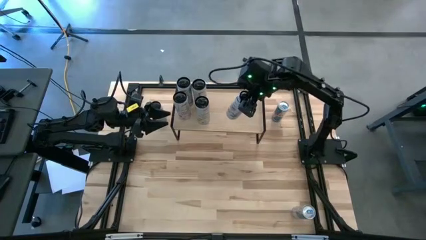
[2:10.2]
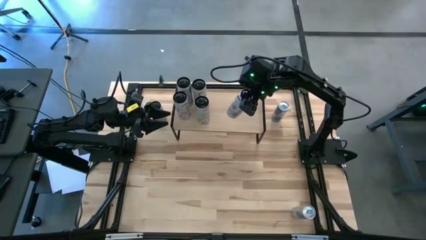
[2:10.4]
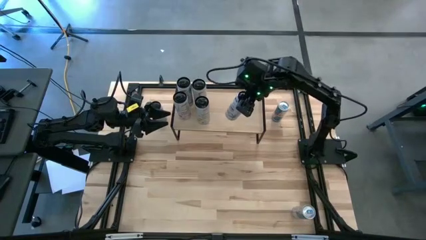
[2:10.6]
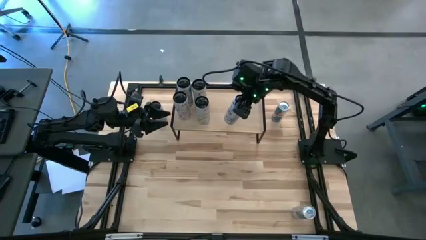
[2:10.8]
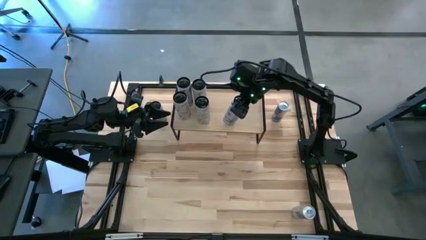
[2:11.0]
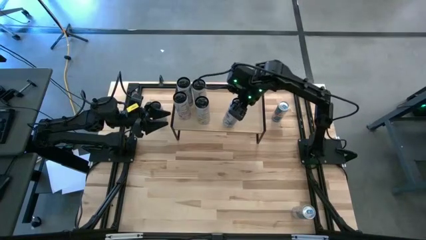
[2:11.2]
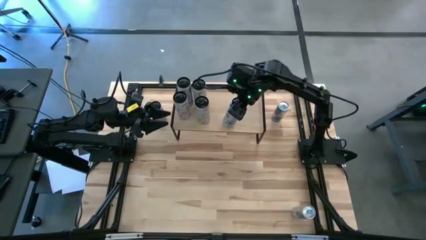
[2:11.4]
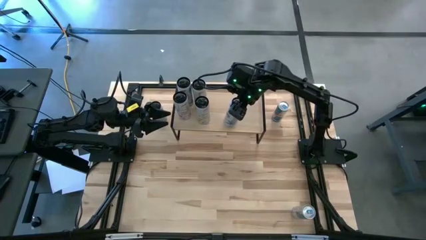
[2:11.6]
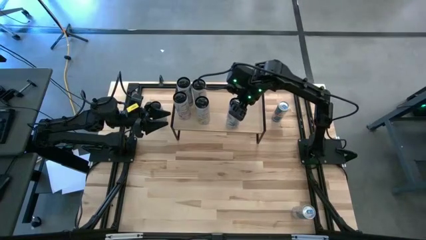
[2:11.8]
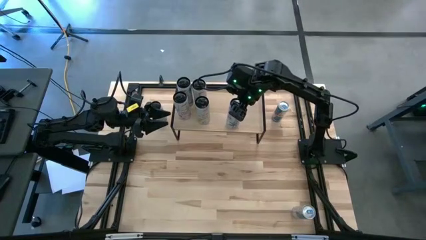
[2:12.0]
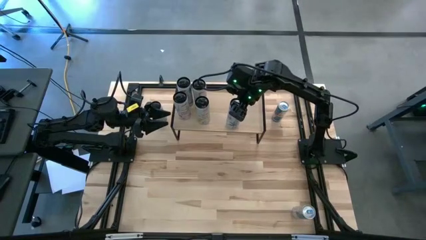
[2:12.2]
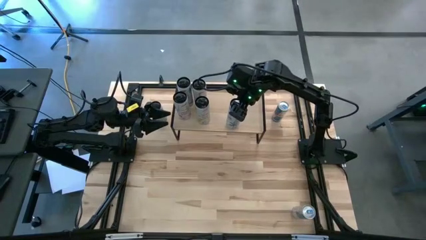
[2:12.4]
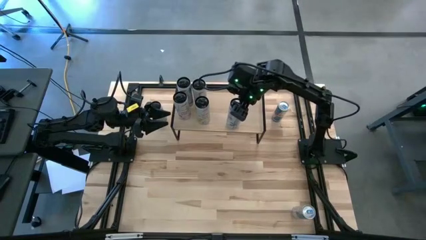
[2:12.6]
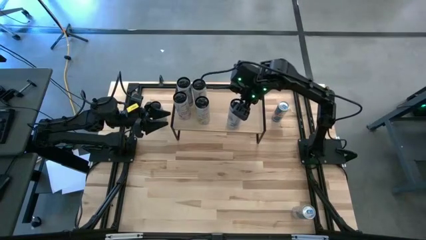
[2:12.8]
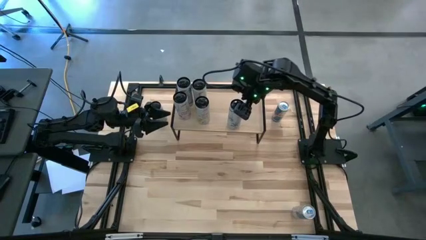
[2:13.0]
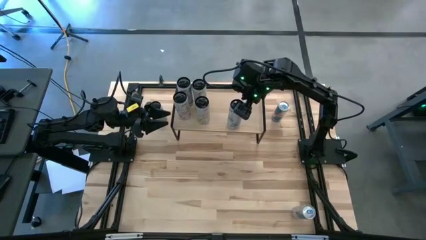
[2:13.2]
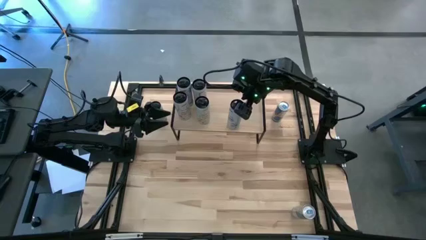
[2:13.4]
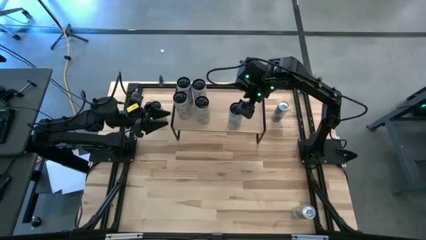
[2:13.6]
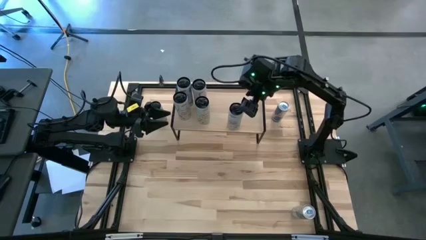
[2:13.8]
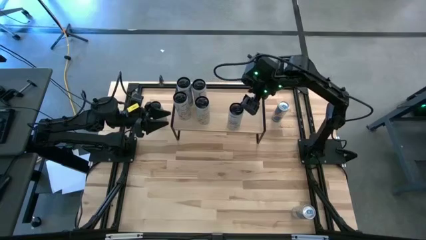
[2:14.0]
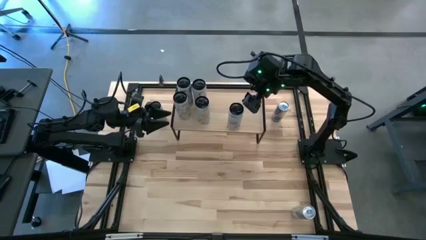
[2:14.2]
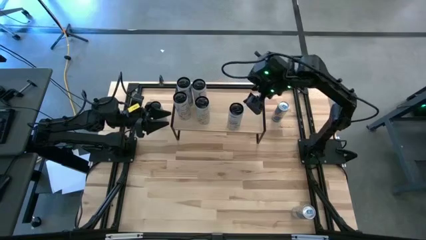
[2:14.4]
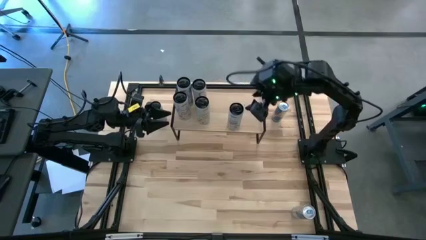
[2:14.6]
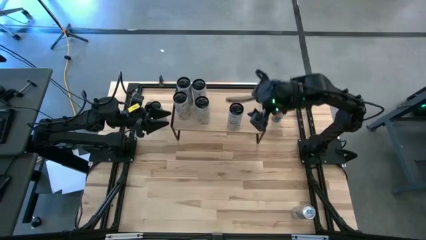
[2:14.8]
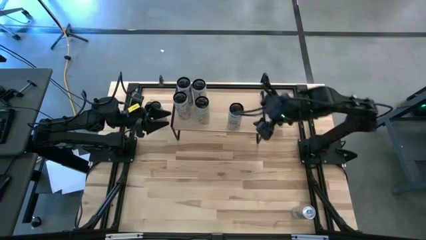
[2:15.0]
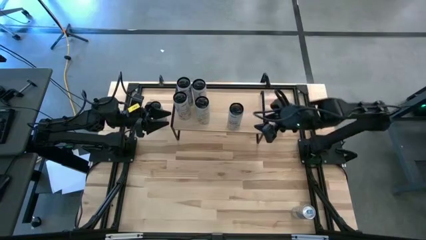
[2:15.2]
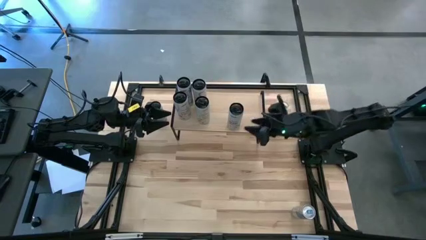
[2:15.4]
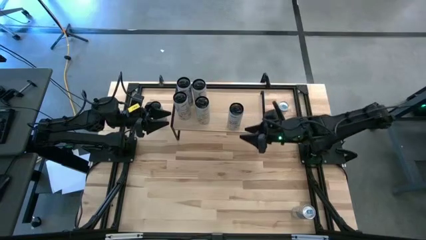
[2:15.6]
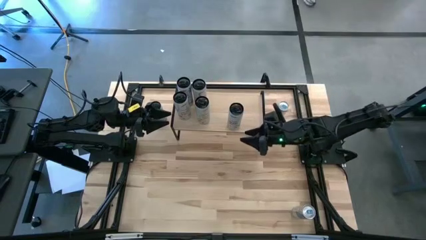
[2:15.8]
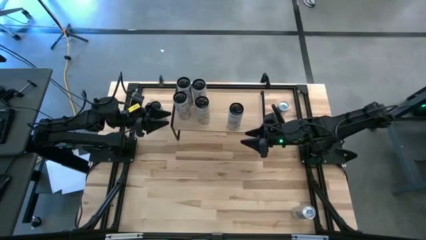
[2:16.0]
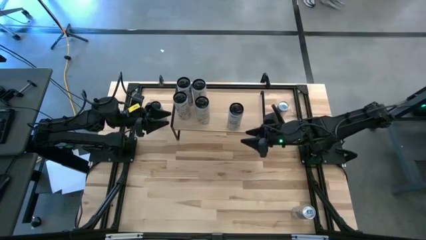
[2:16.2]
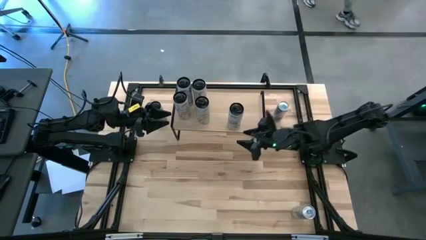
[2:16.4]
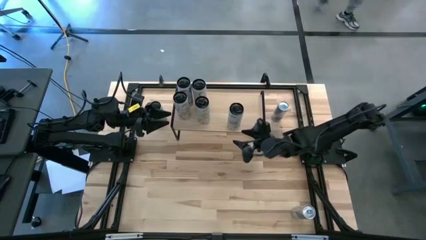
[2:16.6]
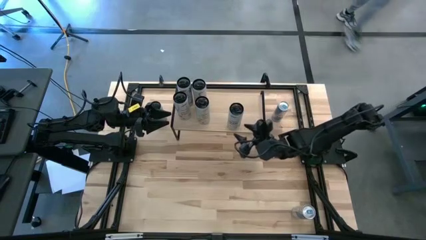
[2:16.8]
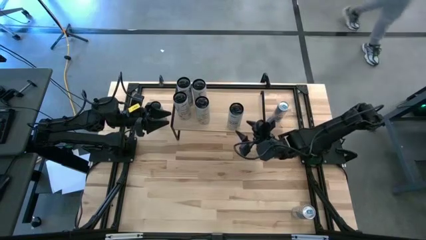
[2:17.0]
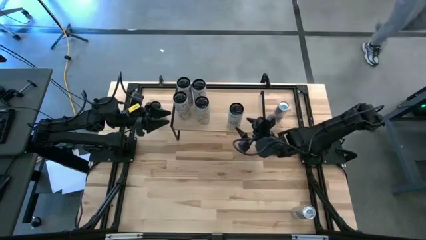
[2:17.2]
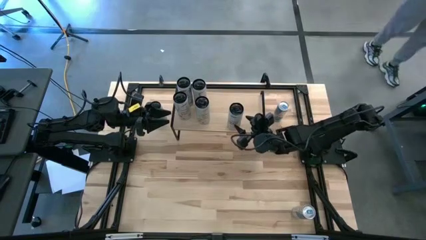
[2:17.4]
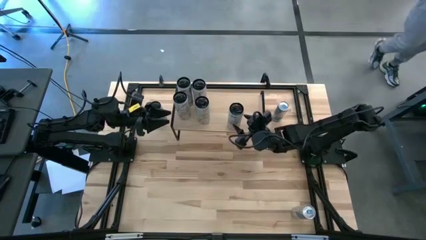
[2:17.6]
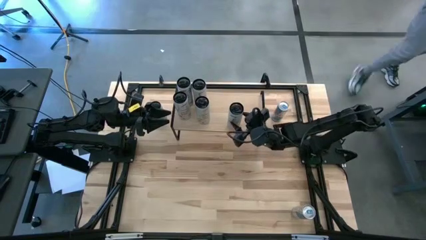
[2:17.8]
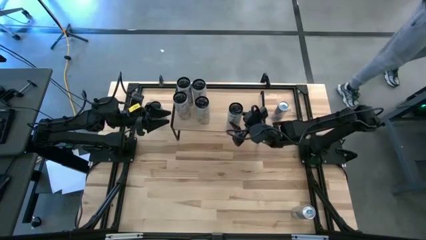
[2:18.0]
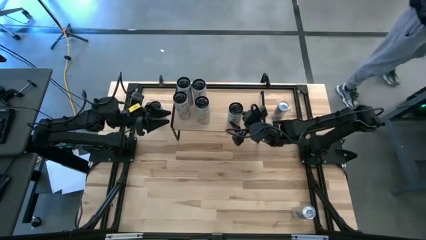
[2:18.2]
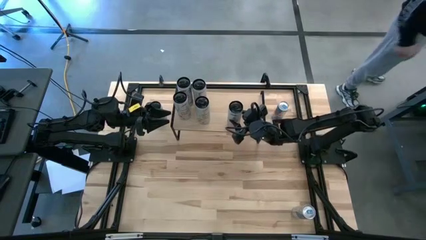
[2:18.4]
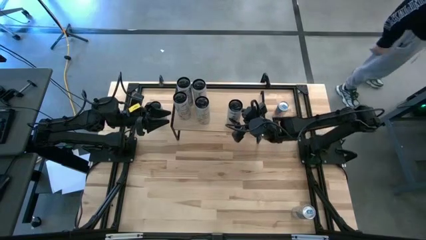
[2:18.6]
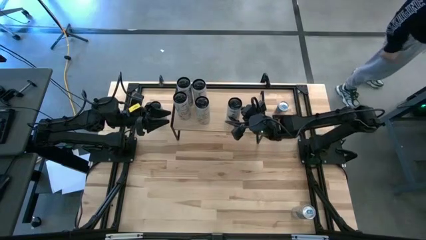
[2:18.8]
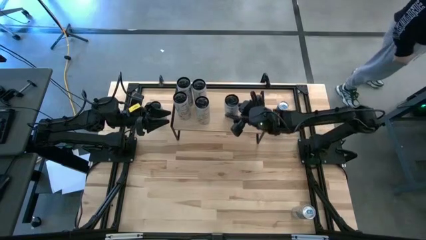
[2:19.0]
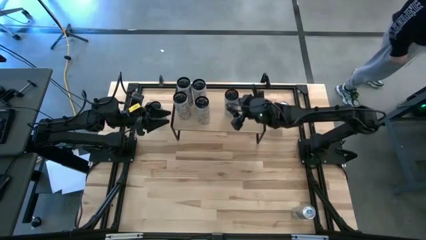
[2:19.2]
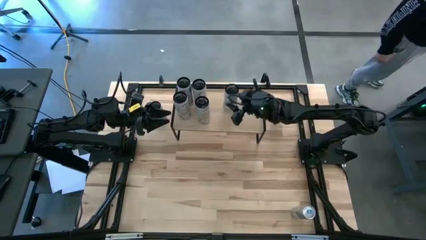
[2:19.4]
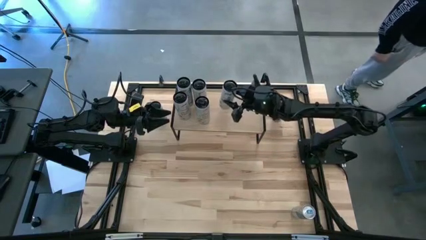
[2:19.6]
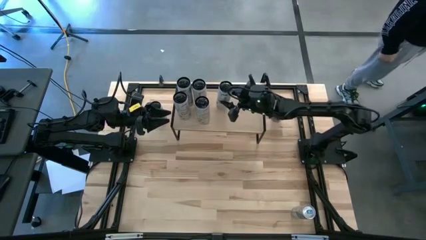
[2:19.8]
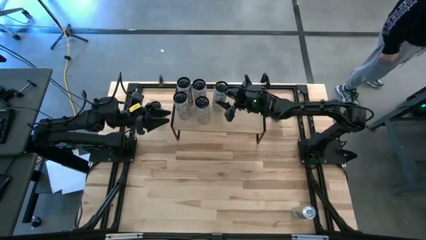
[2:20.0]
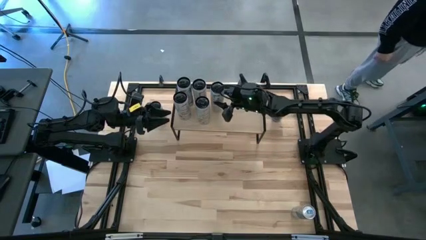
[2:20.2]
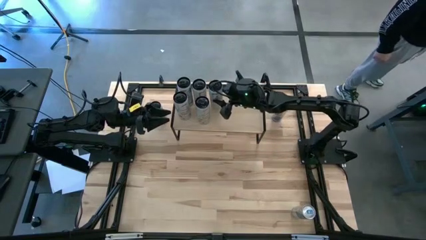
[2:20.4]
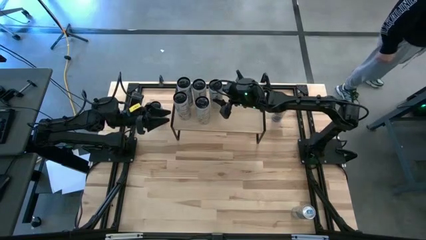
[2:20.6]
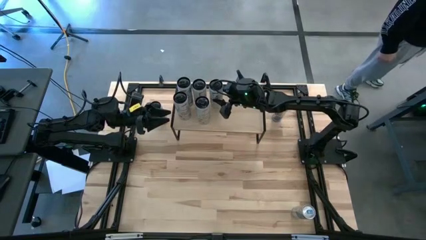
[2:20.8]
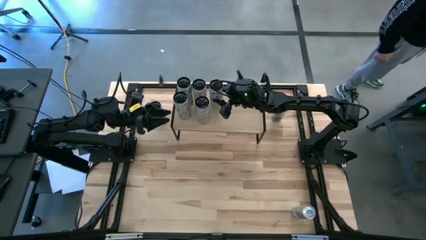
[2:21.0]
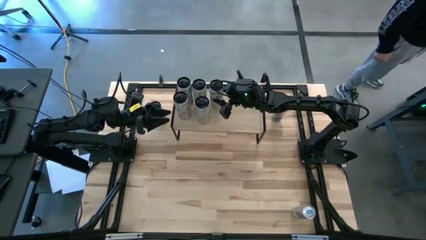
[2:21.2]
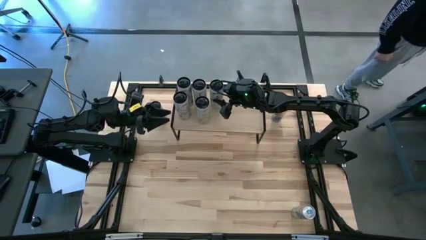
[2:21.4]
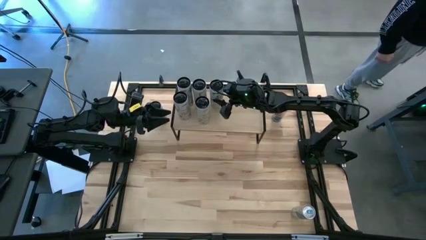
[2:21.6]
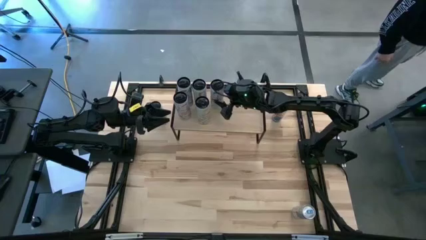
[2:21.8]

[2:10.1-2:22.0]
Task: Place canned beverage on shelf
Put the right white blue soda can on the shelf
